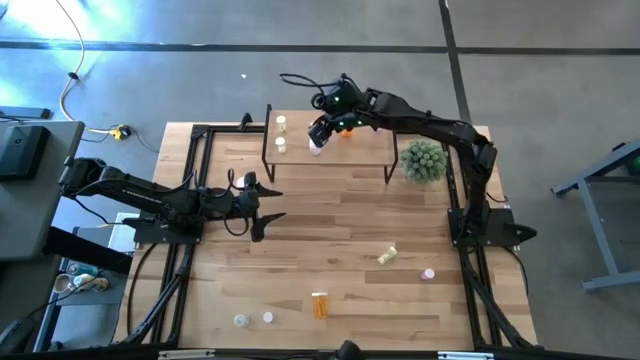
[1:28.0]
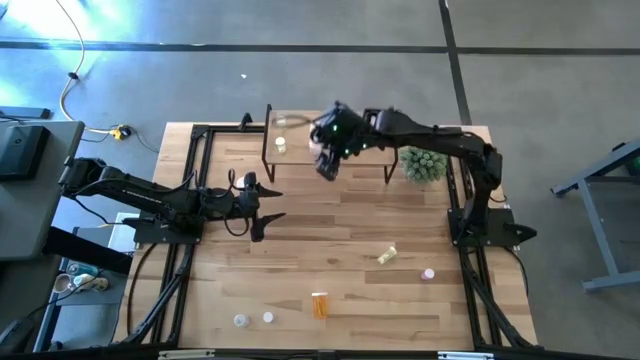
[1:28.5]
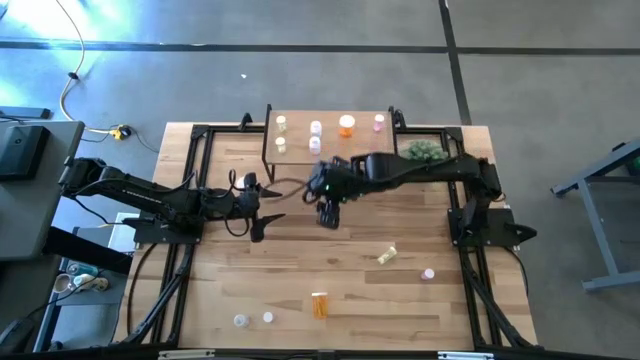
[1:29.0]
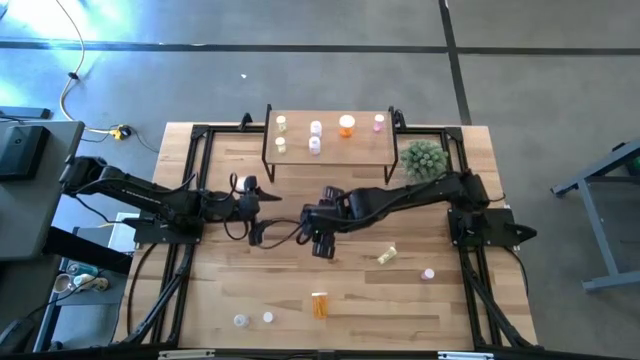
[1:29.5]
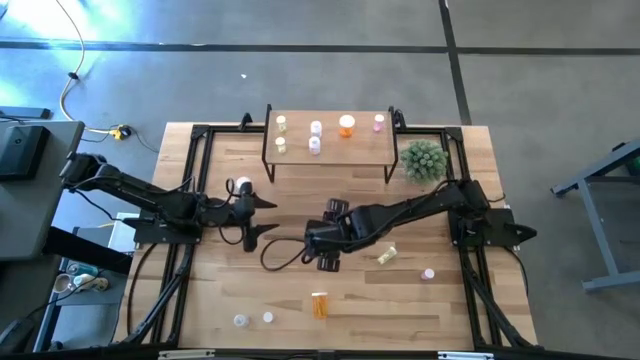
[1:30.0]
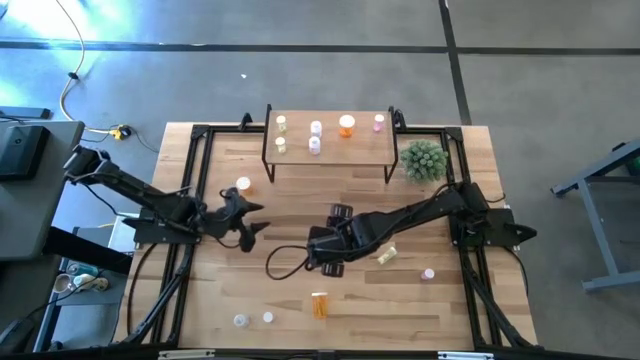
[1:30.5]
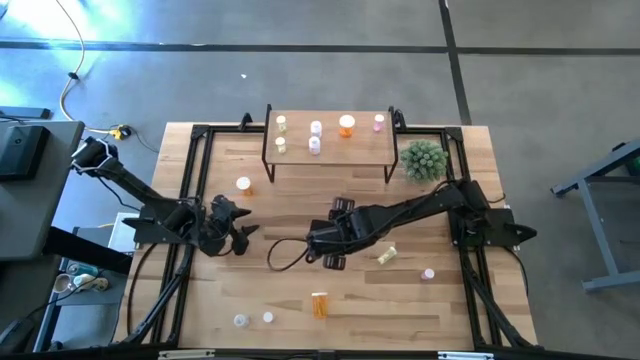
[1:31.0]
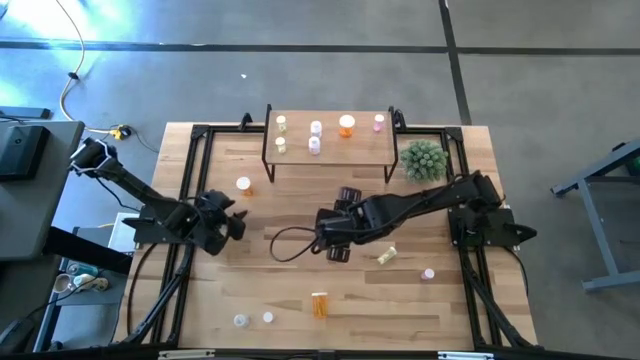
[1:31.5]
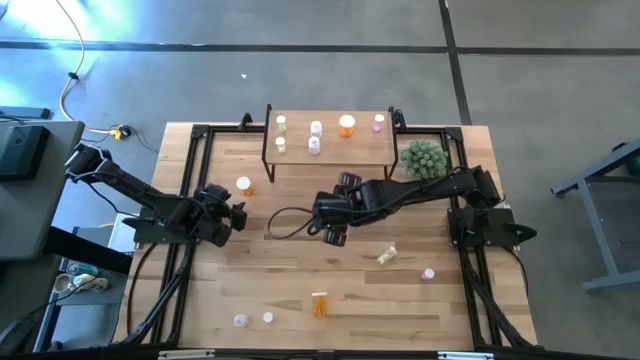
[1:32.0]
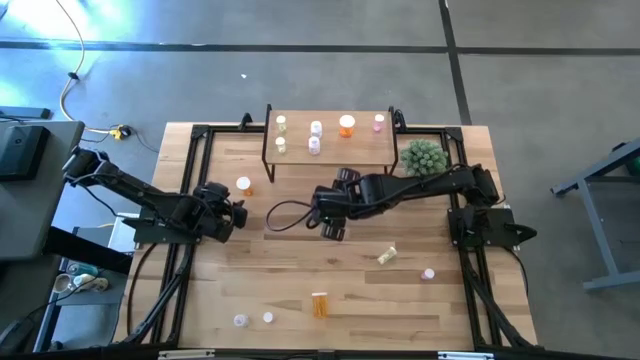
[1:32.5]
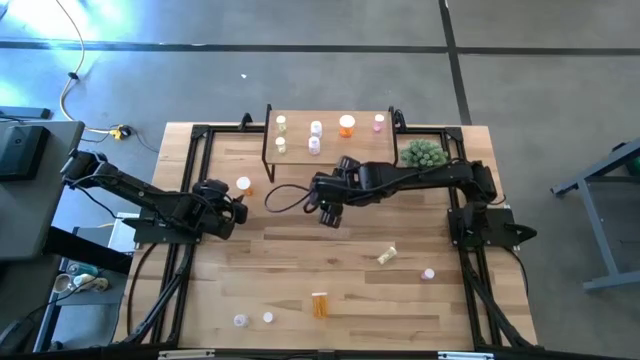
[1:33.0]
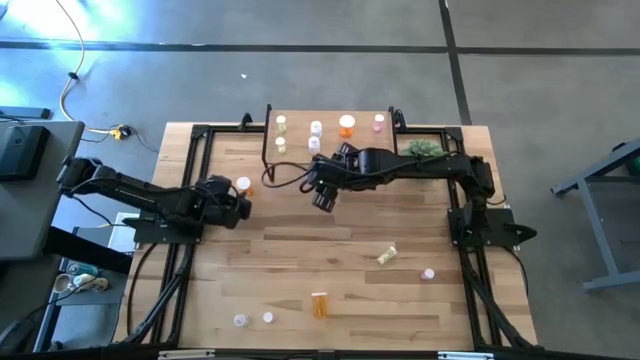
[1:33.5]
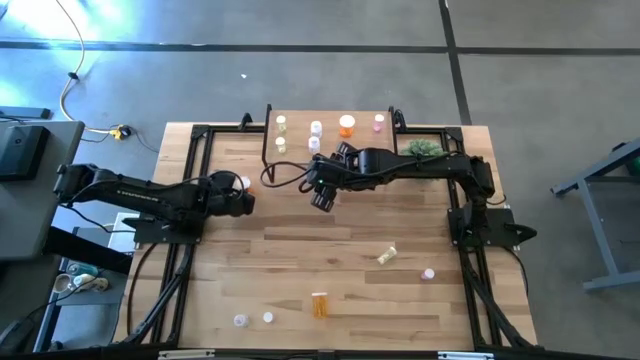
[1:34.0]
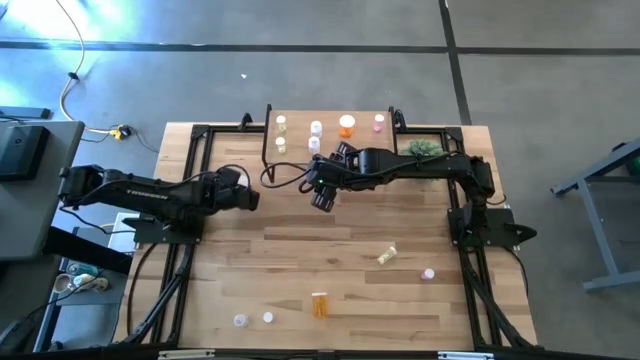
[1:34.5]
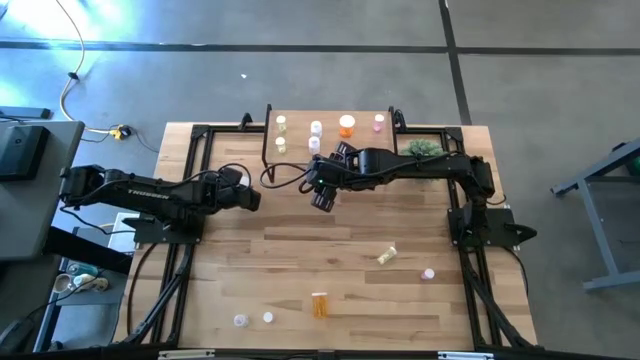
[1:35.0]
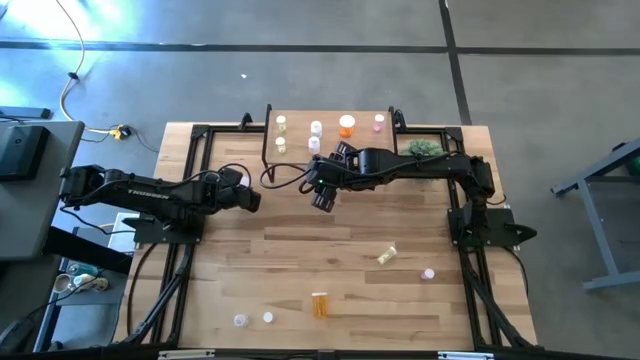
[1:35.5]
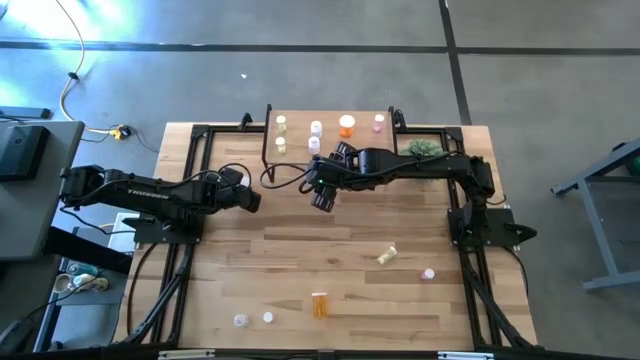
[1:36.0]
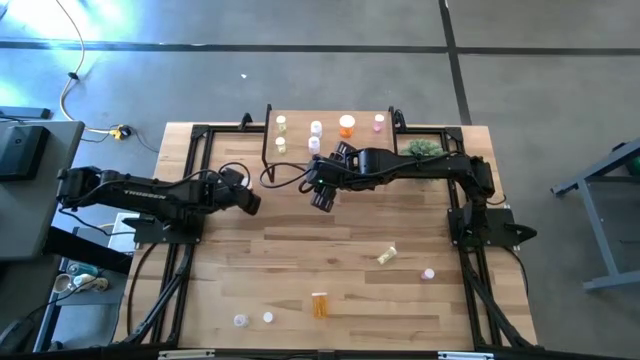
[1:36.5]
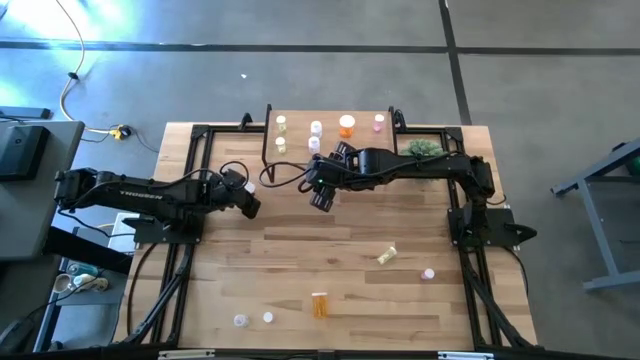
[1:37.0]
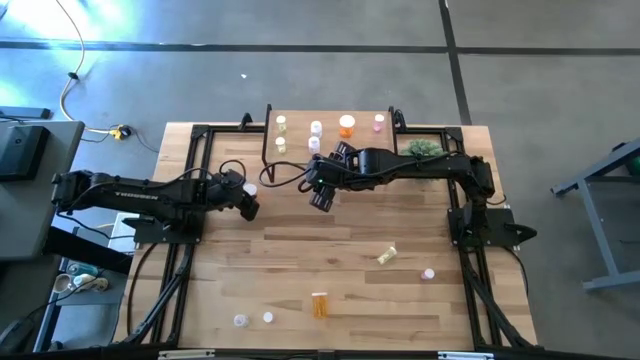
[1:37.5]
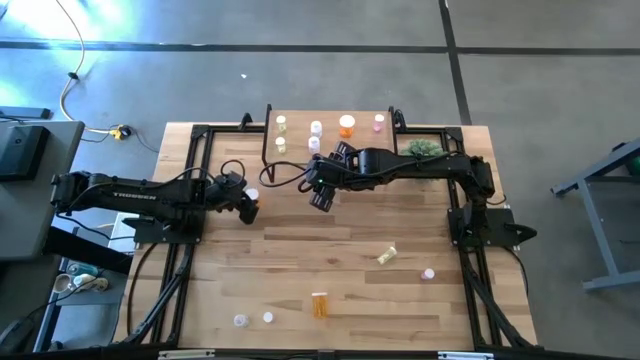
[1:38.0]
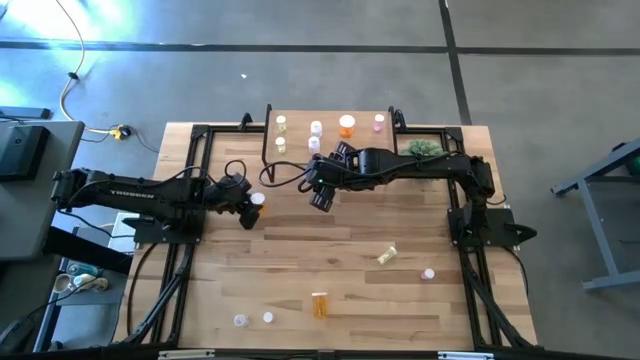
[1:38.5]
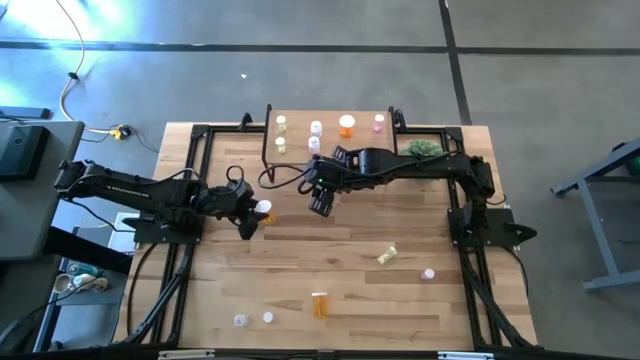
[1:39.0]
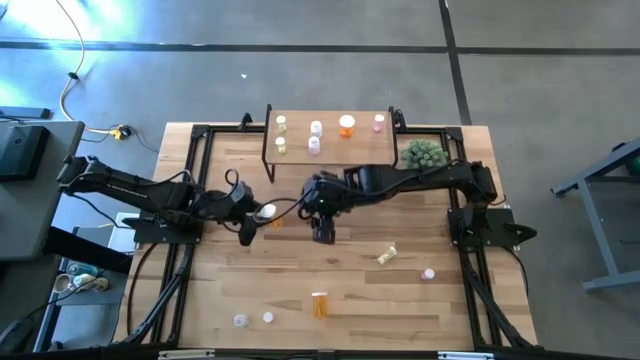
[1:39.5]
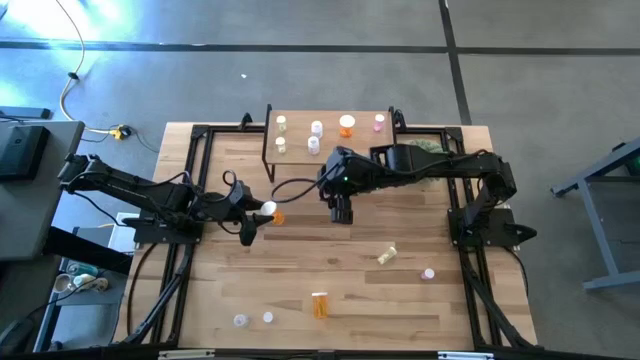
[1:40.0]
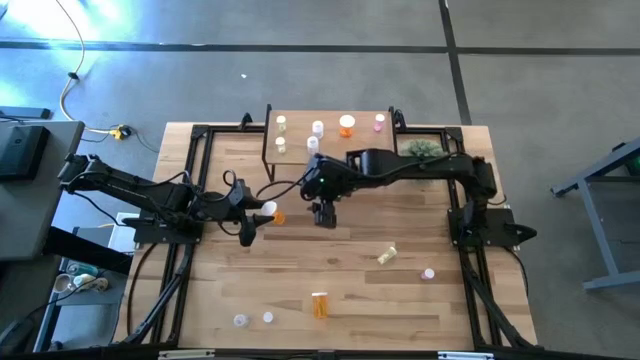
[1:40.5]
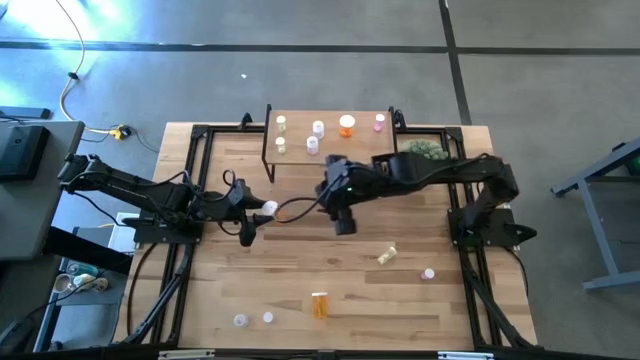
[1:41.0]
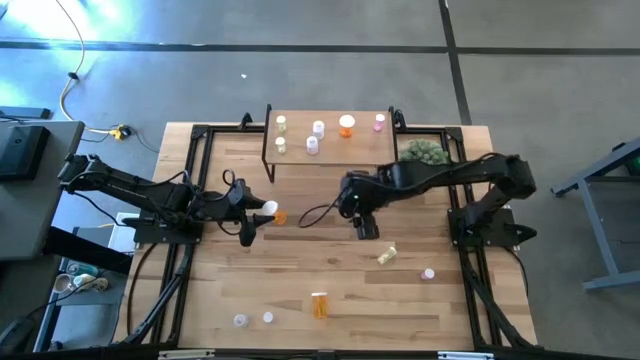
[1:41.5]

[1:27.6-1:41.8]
Task: Pick and place medicine bottles onto shelf by color
Put the top orange pill bottle aligned with the other orange pill bottle on the shelf

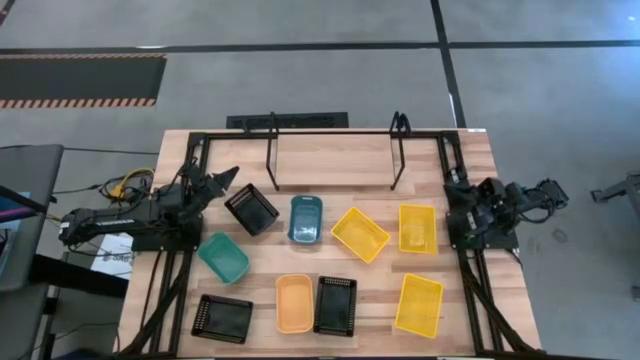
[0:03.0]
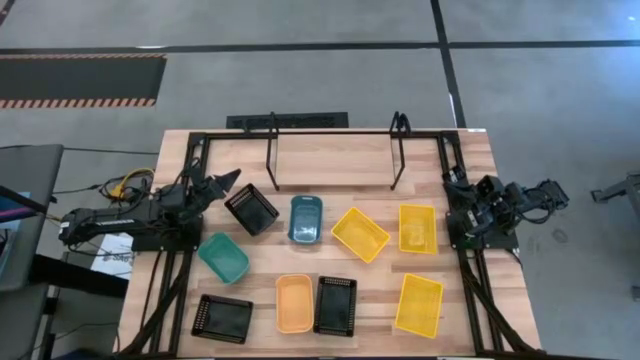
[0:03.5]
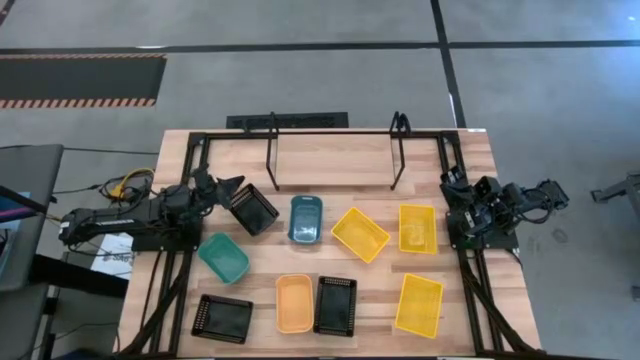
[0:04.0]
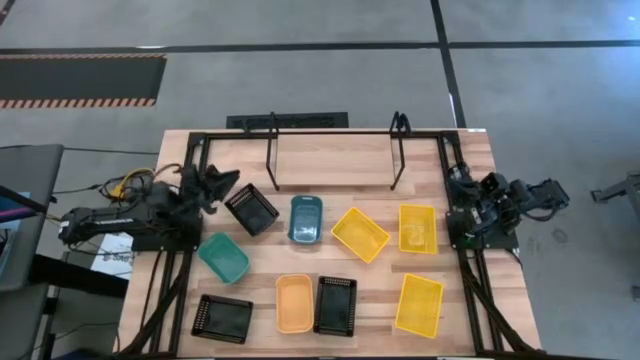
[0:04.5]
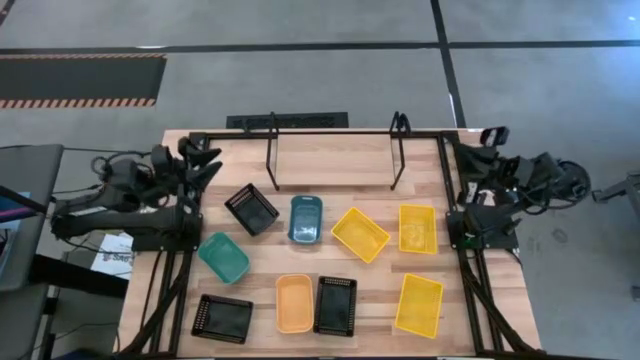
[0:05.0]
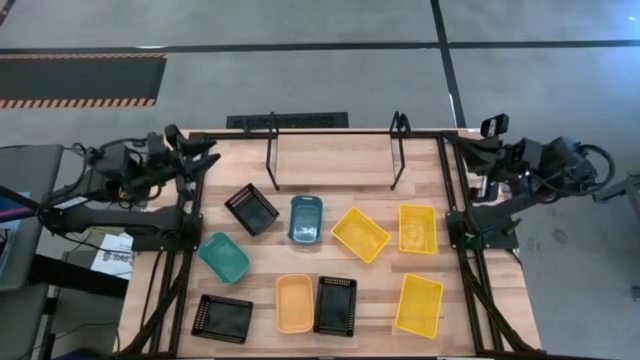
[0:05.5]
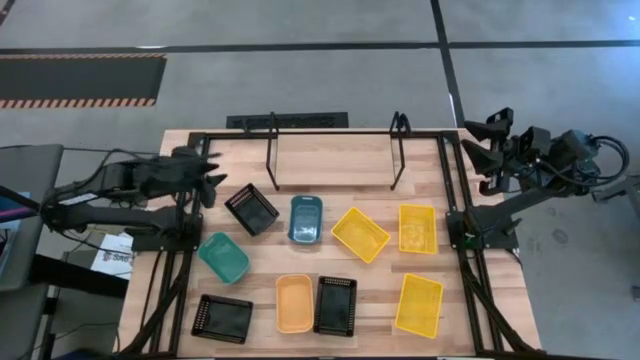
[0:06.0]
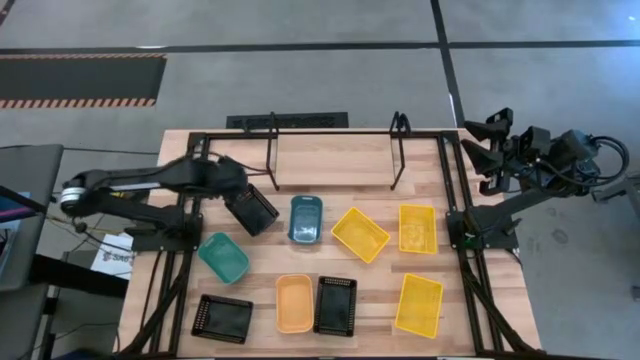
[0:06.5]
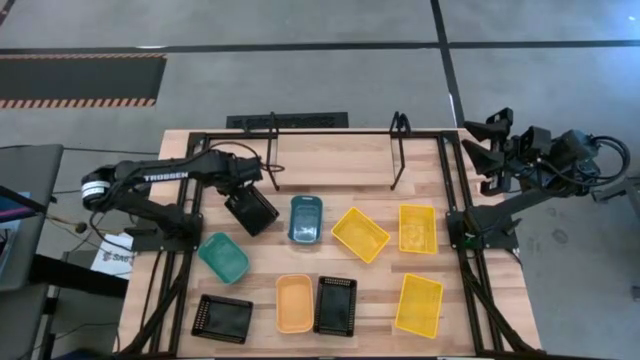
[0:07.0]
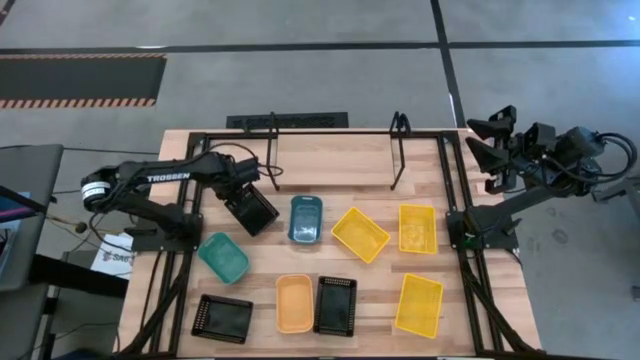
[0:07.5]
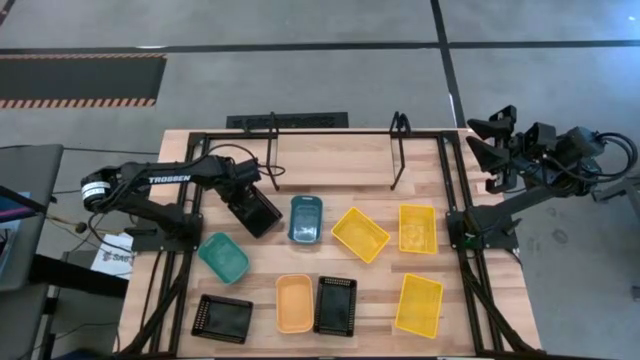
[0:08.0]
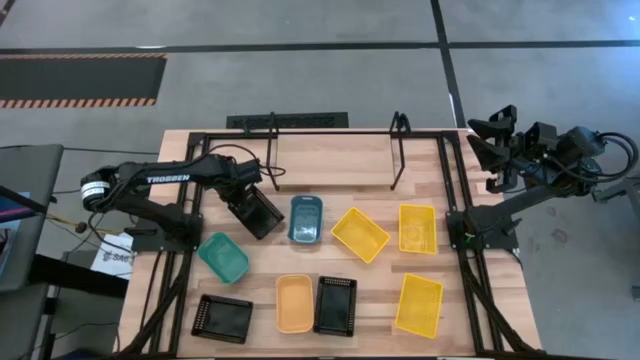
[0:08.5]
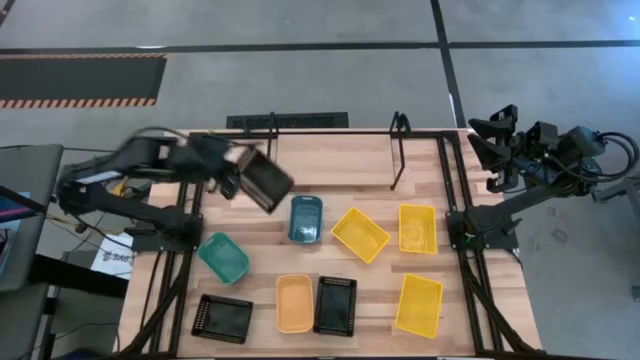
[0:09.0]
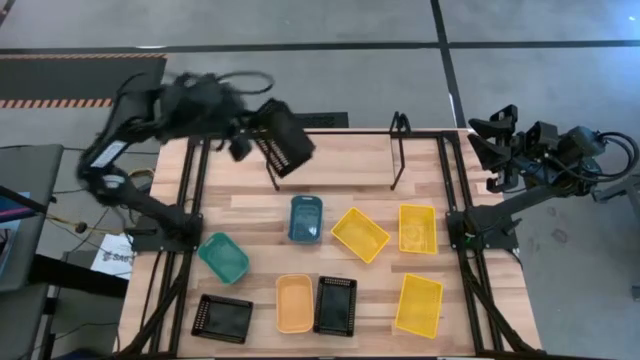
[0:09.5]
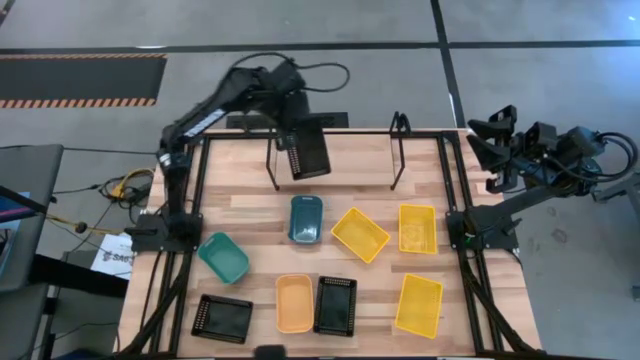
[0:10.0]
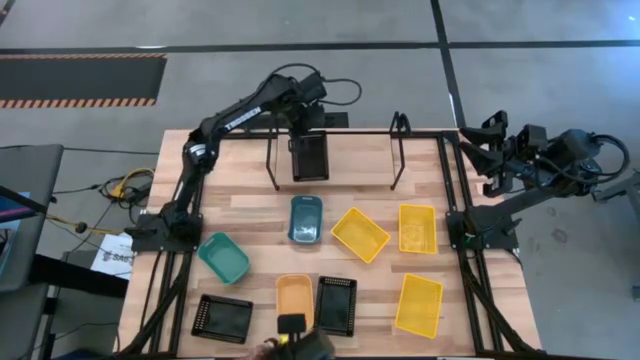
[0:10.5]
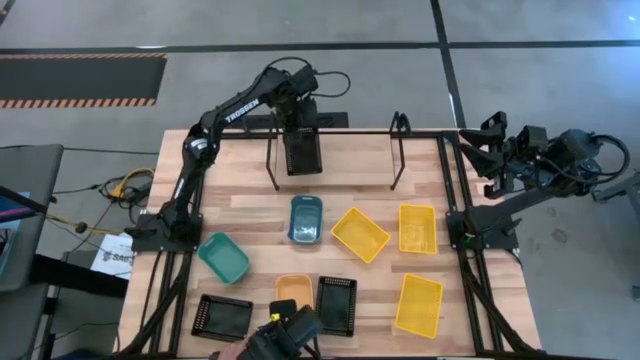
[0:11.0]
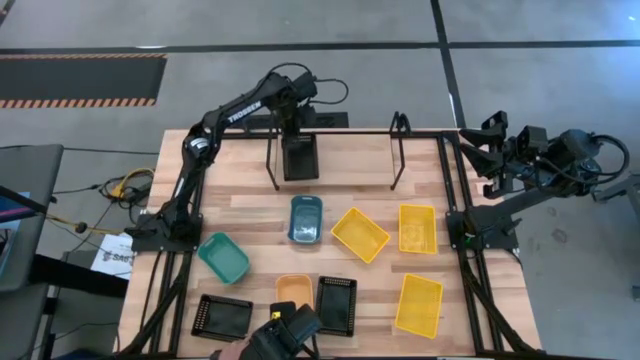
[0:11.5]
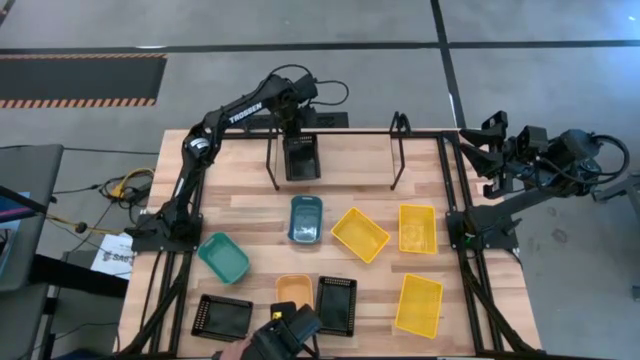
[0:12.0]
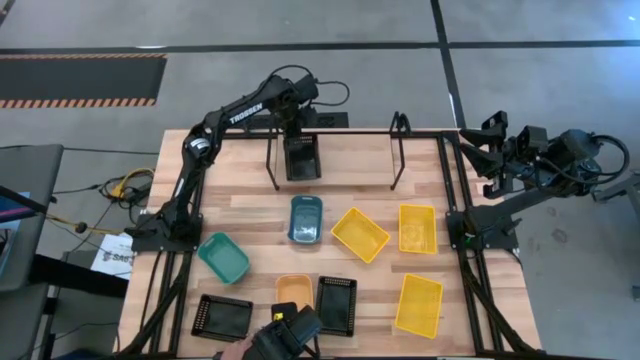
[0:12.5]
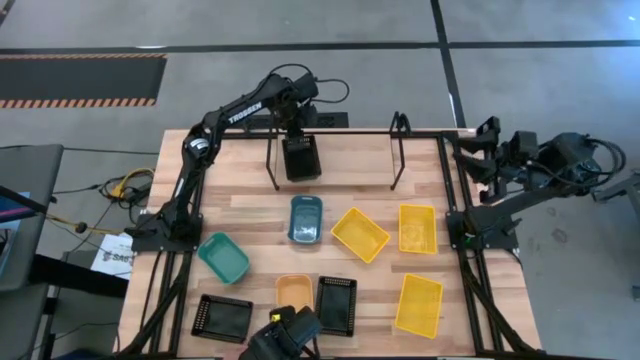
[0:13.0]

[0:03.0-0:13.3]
Task: Stack baskets on shelf by color
Put the middle black bin on the shelf
